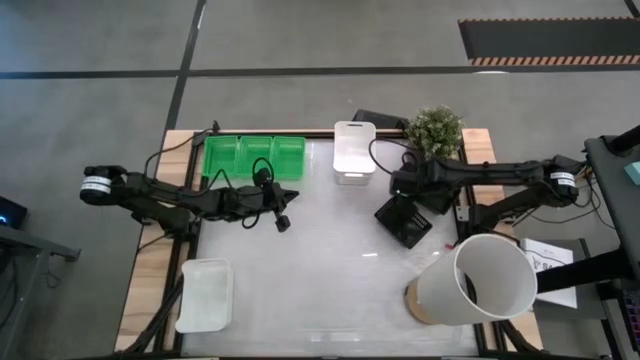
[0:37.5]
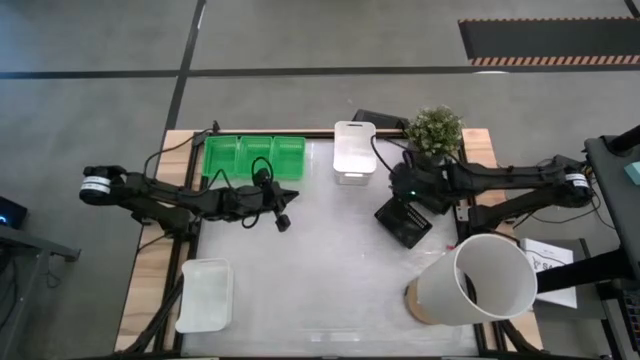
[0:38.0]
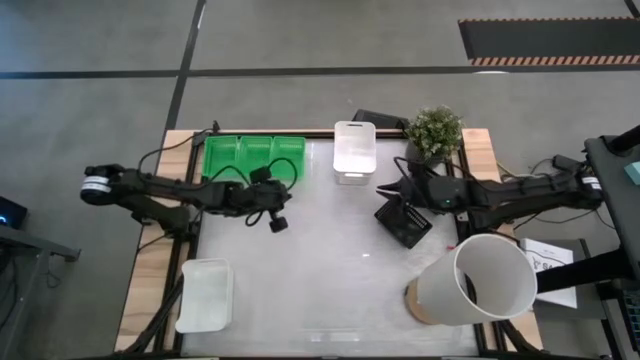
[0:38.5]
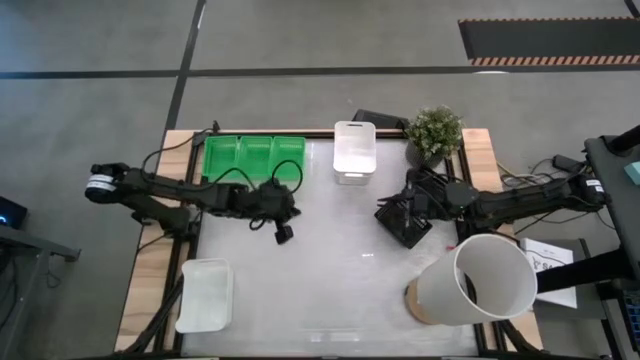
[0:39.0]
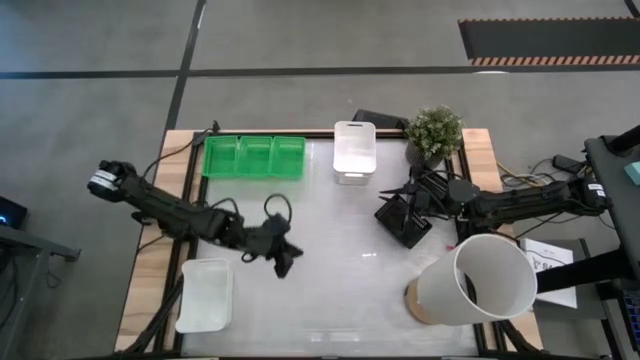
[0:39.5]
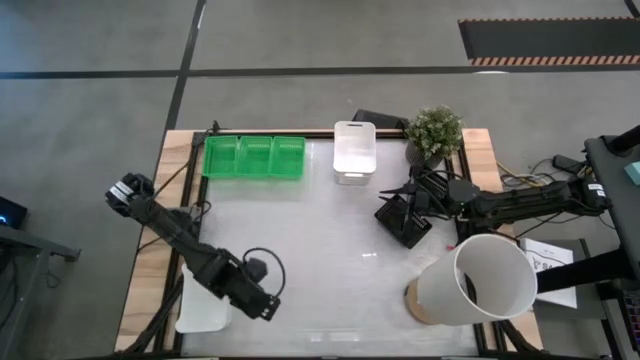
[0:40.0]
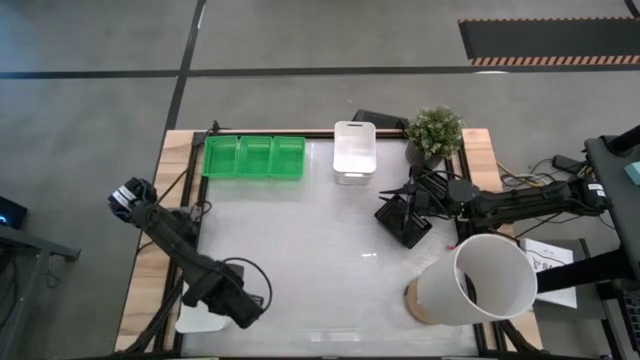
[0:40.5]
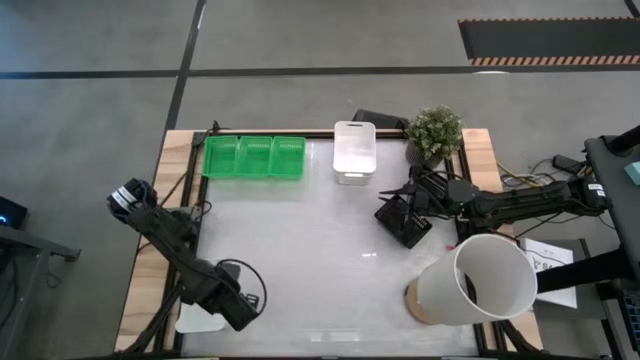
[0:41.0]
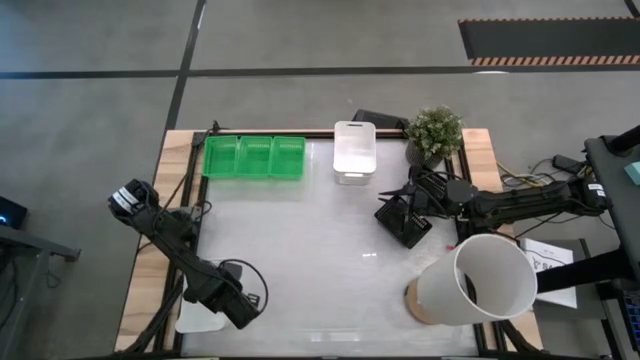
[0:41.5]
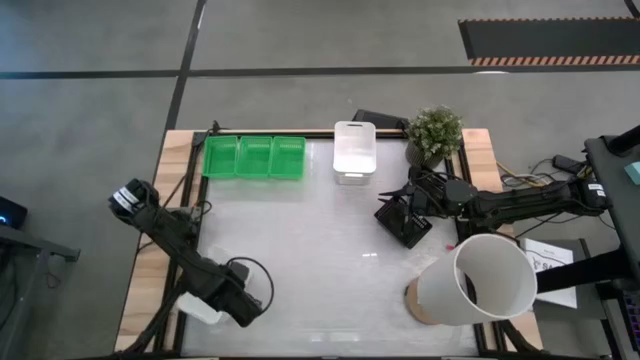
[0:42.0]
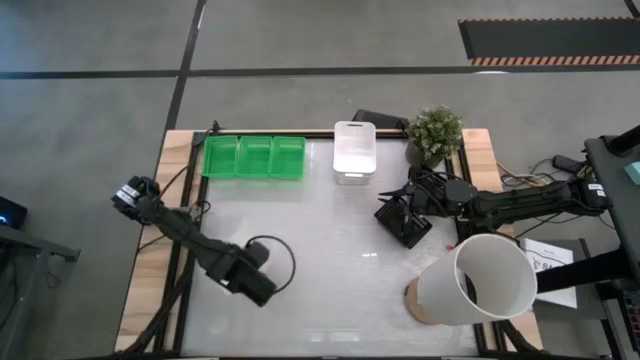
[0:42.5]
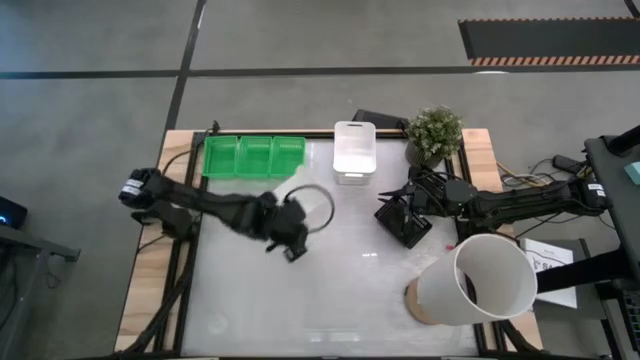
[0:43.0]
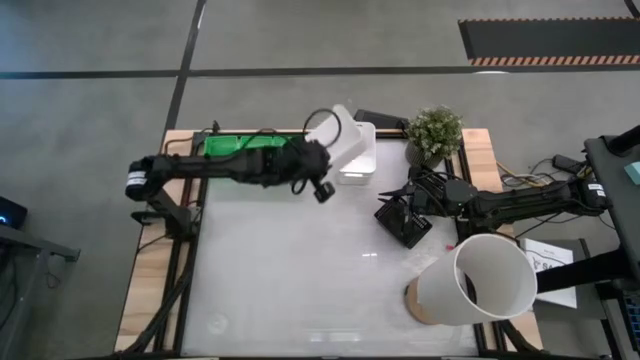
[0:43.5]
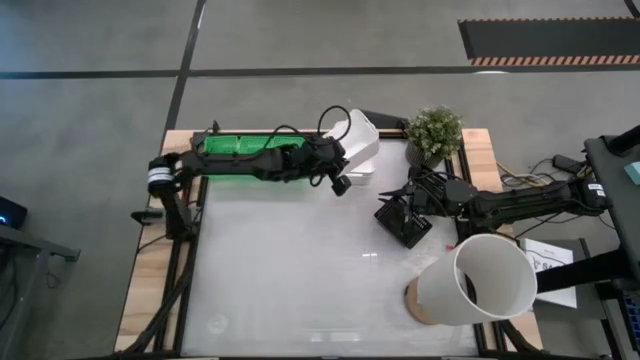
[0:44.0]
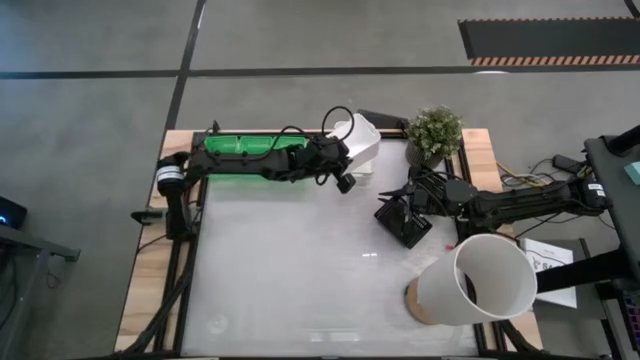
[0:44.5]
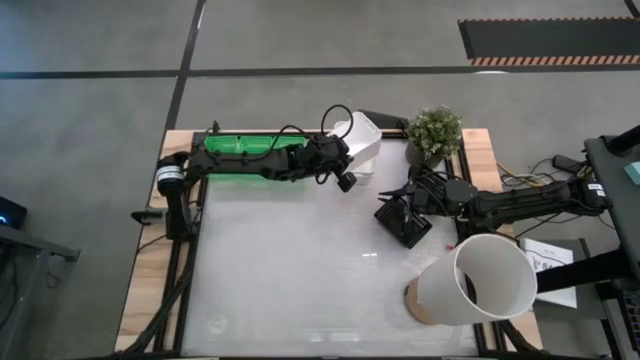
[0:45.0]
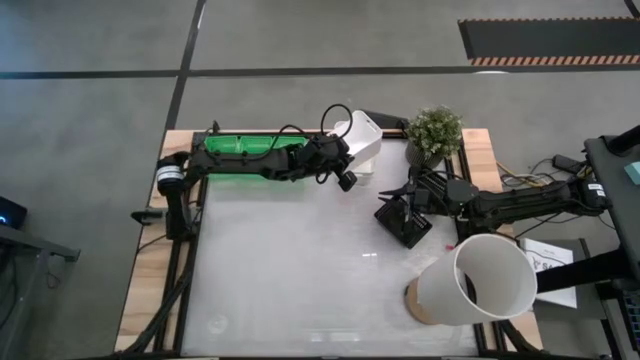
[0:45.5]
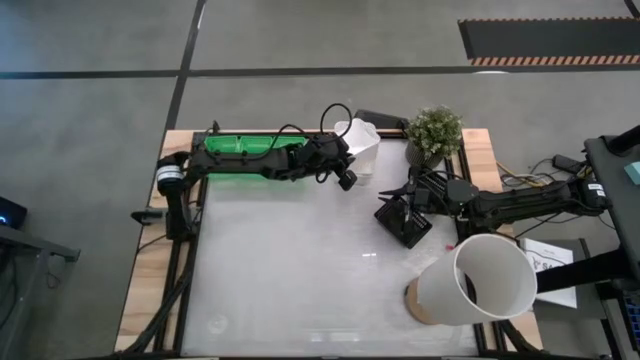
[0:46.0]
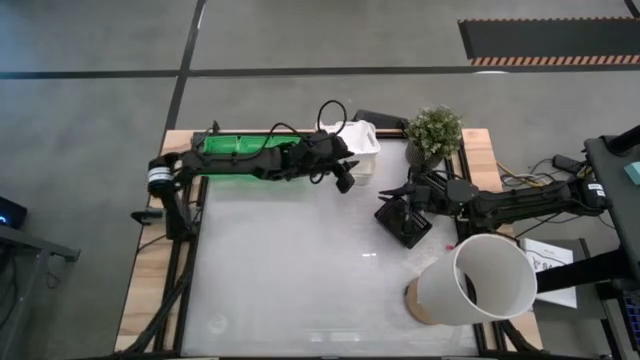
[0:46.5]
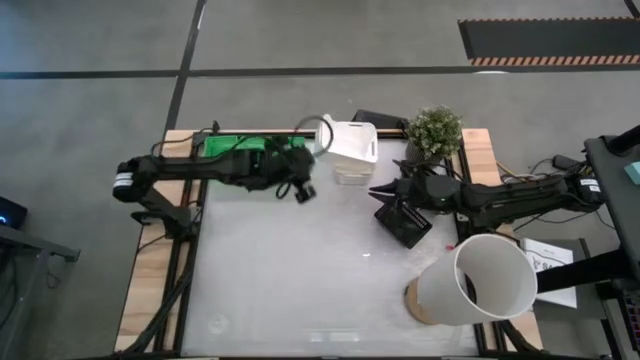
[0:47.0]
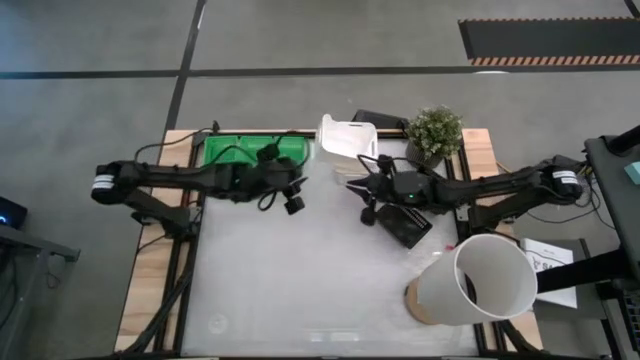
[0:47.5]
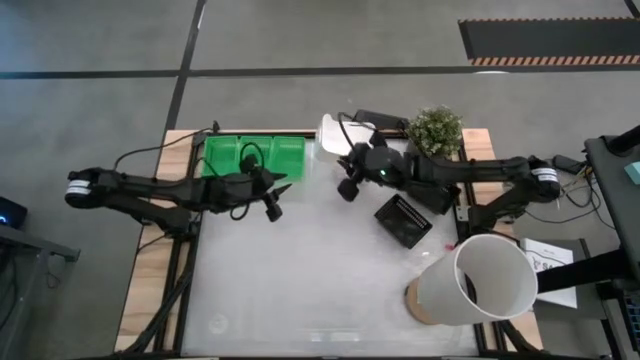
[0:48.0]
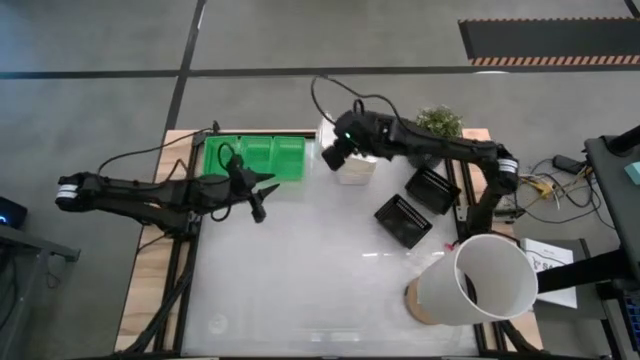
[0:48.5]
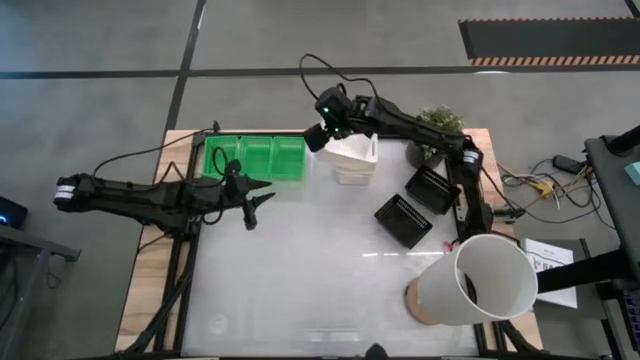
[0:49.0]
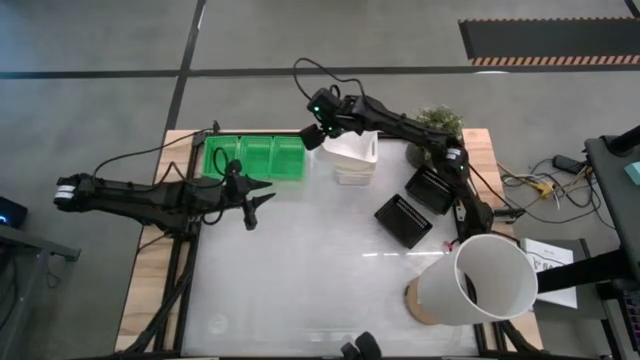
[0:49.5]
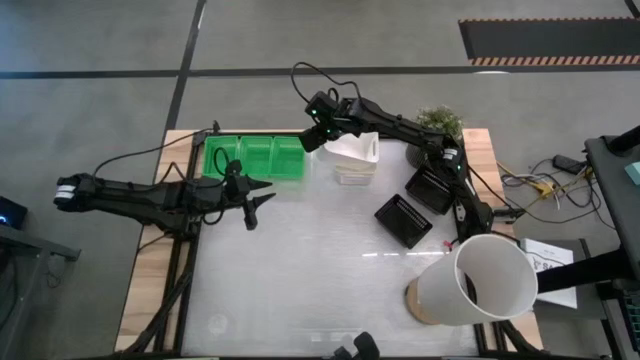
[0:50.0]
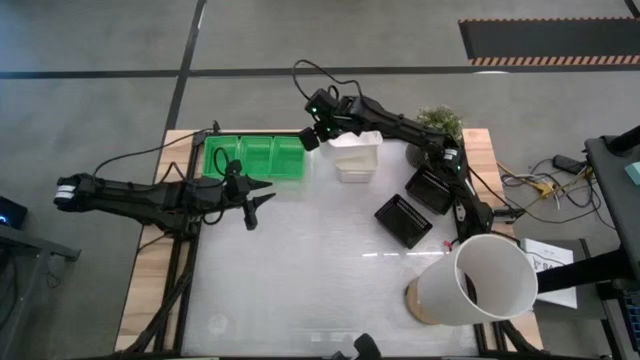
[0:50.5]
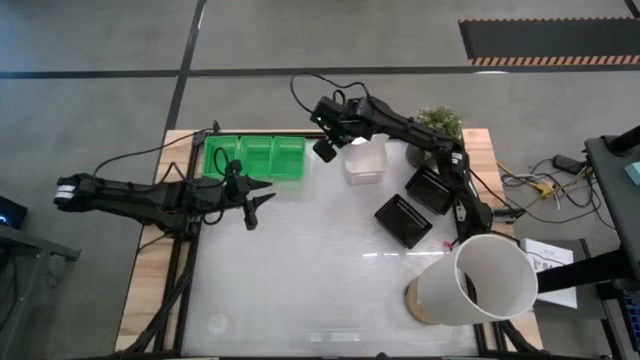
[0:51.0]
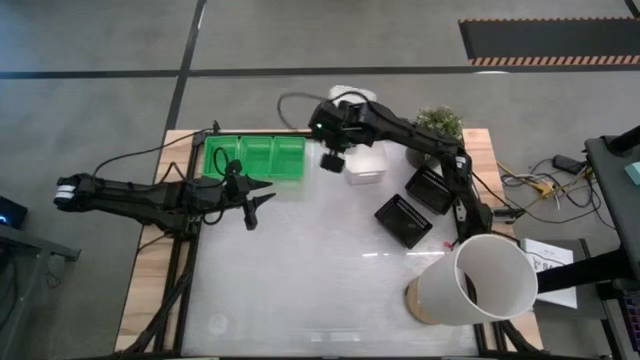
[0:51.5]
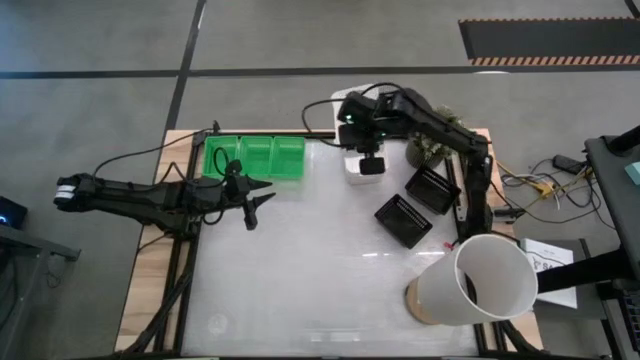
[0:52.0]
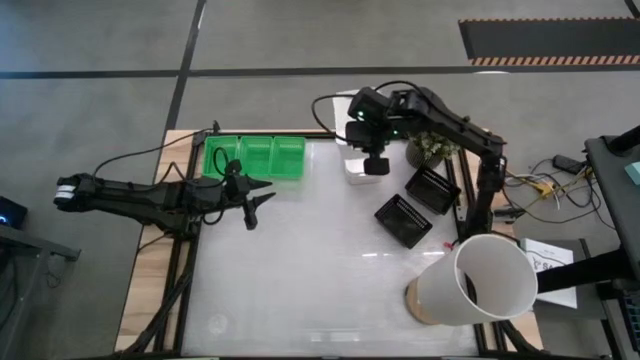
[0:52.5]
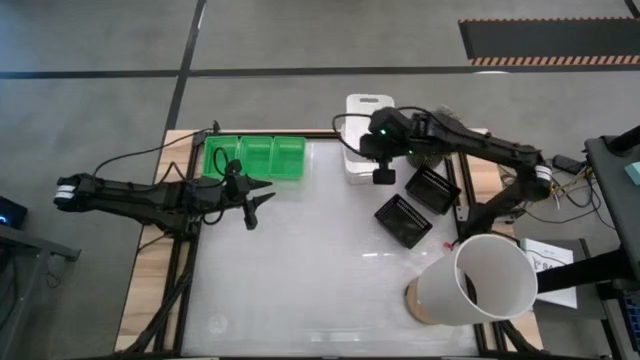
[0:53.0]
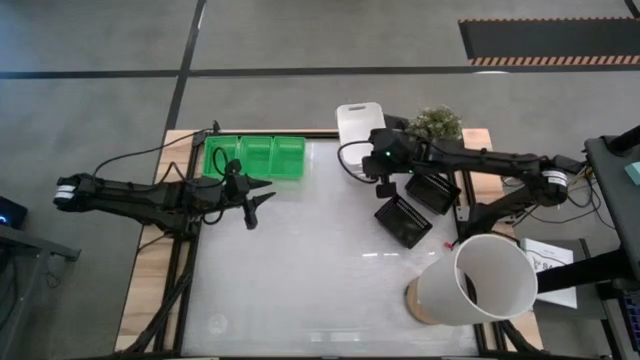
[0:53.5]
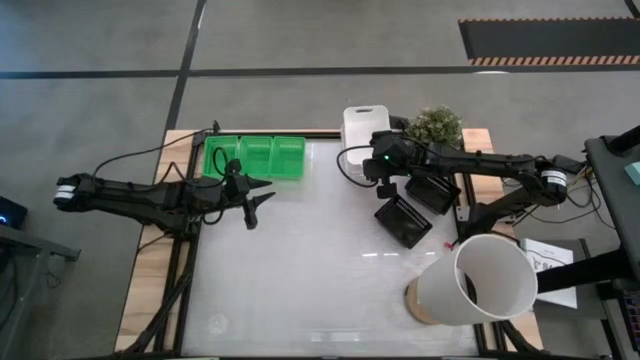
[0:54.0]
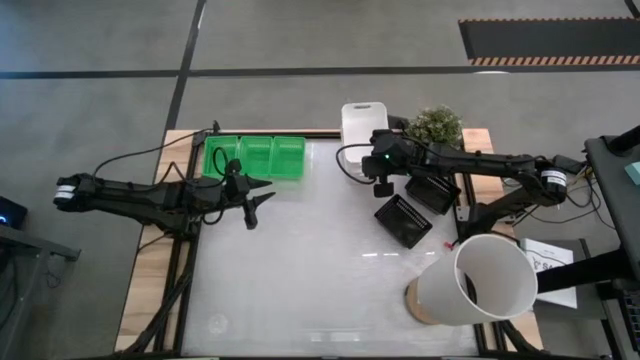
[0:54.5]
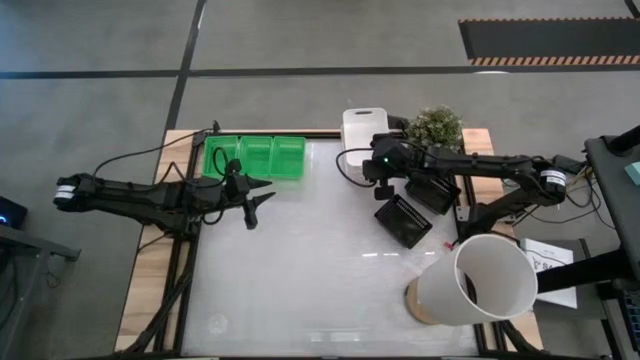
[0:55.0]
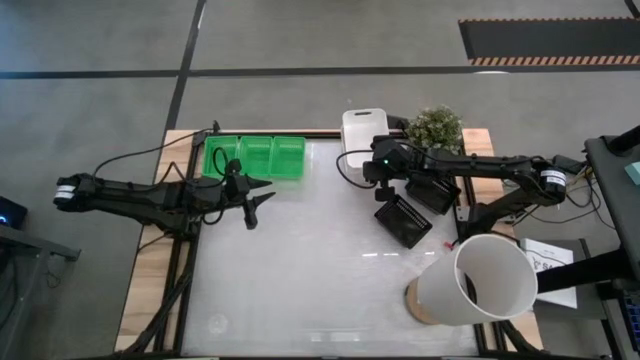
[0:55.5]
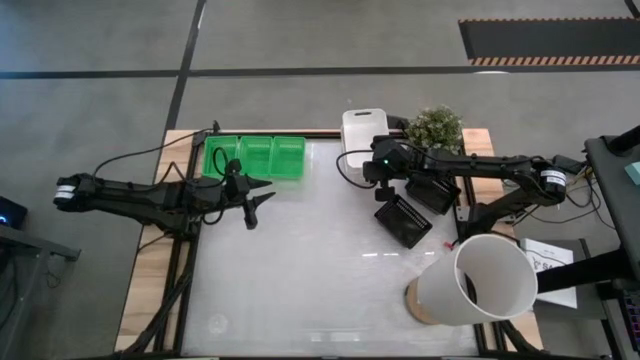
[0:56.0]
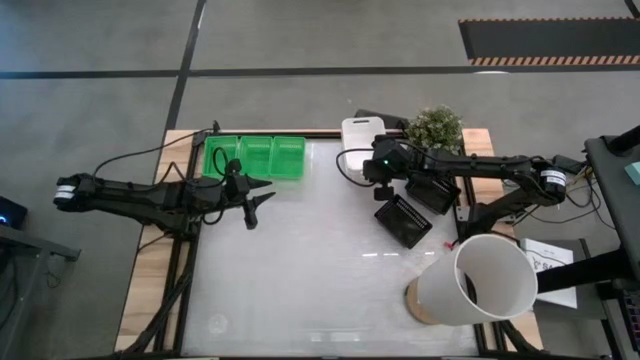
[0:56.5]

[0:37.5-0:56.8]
Stack the bottom white bin on top of the top white bin
